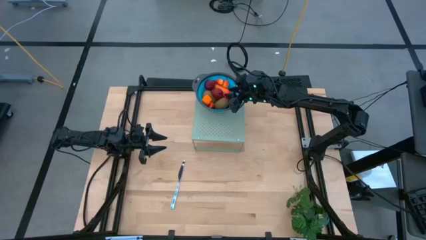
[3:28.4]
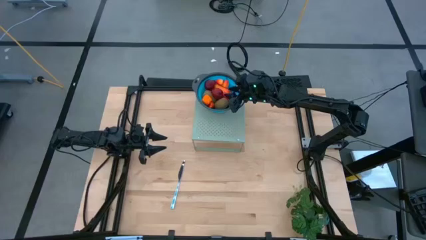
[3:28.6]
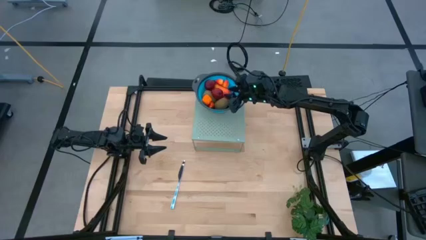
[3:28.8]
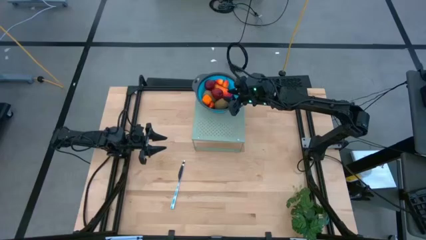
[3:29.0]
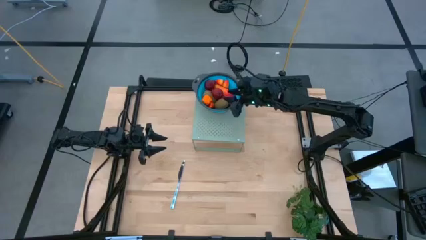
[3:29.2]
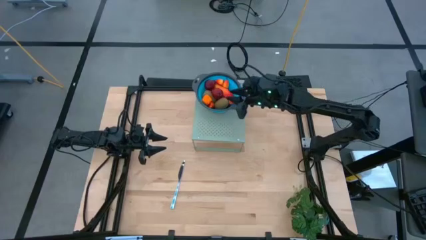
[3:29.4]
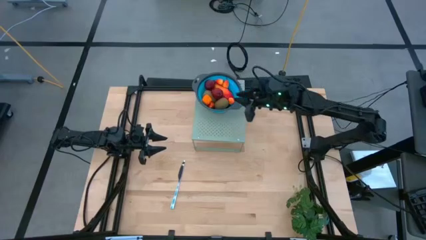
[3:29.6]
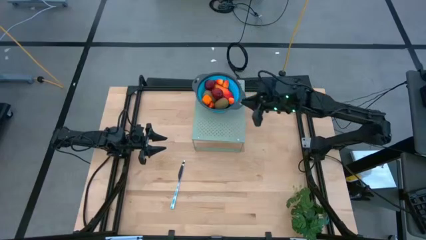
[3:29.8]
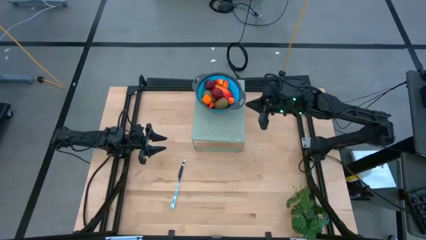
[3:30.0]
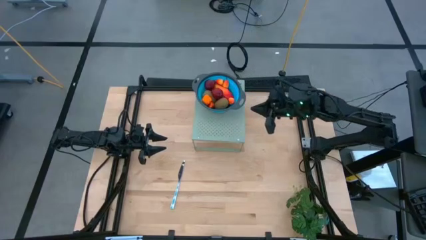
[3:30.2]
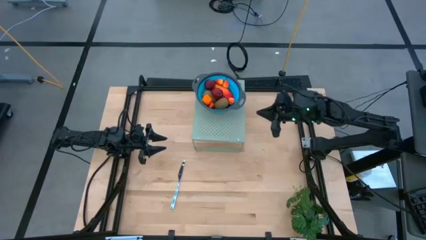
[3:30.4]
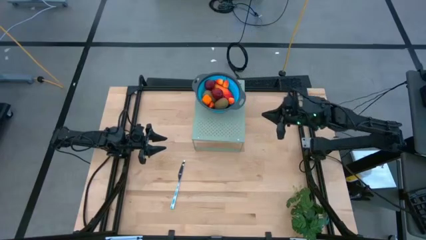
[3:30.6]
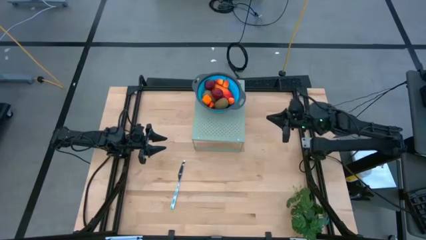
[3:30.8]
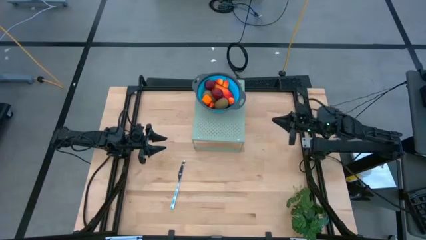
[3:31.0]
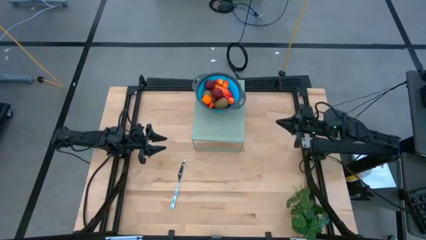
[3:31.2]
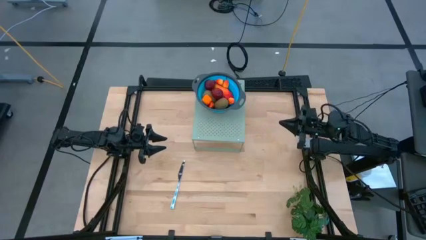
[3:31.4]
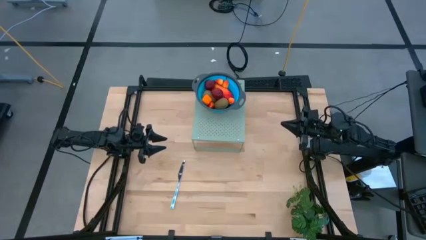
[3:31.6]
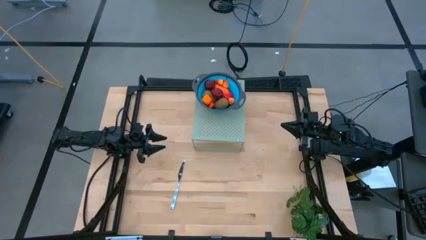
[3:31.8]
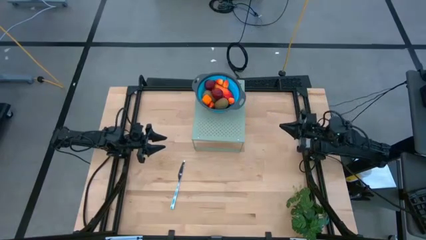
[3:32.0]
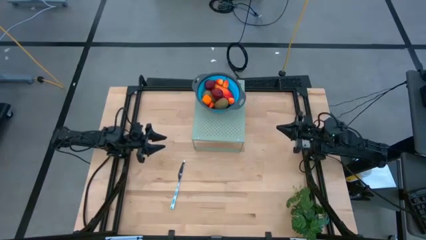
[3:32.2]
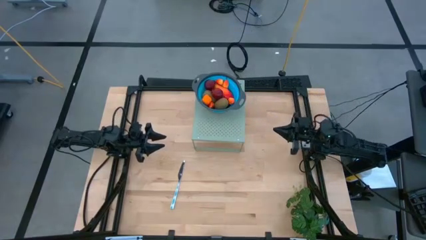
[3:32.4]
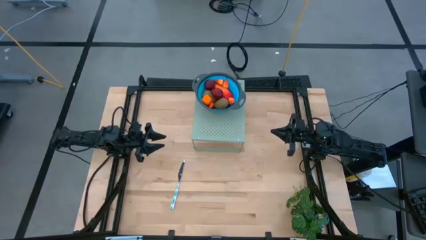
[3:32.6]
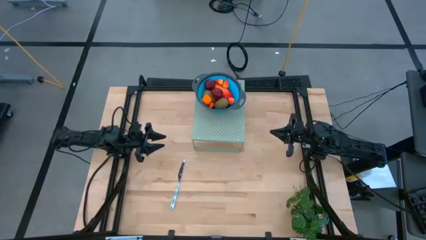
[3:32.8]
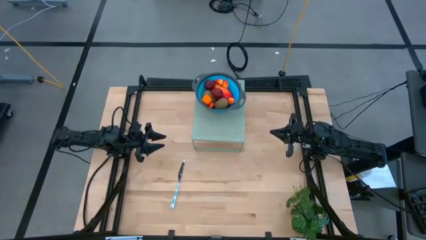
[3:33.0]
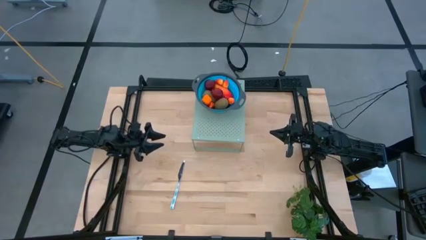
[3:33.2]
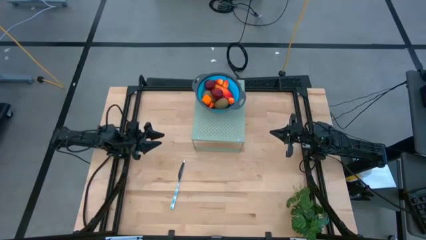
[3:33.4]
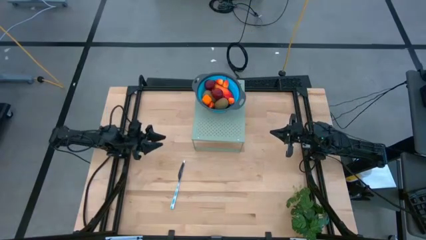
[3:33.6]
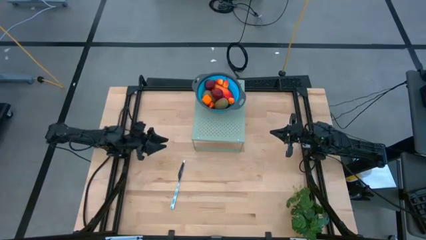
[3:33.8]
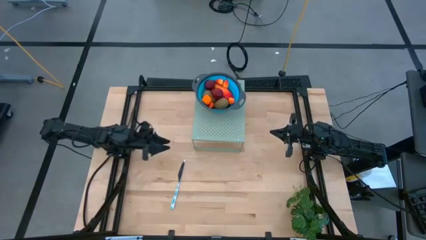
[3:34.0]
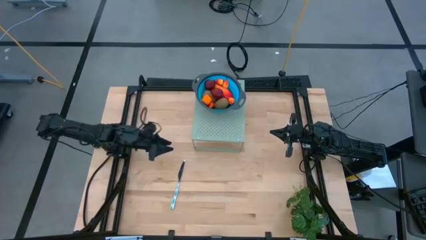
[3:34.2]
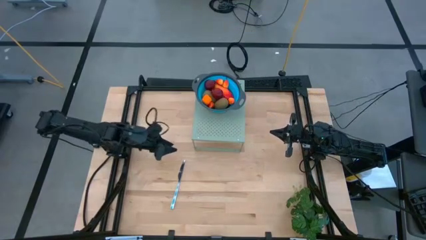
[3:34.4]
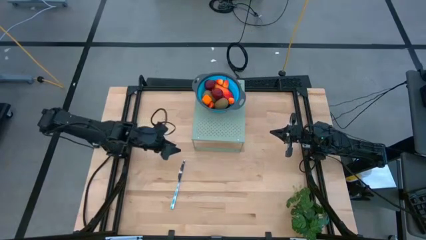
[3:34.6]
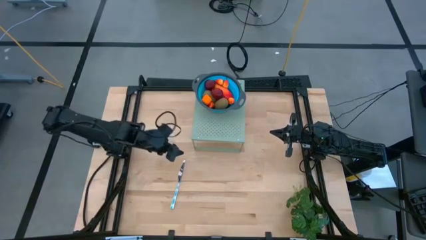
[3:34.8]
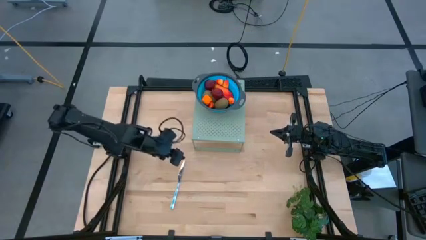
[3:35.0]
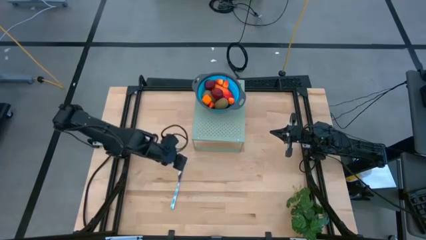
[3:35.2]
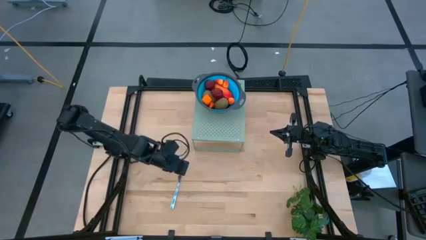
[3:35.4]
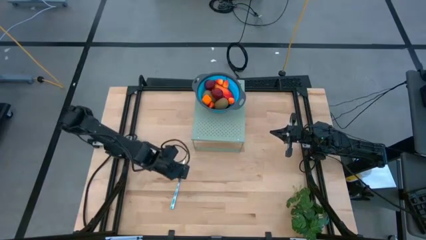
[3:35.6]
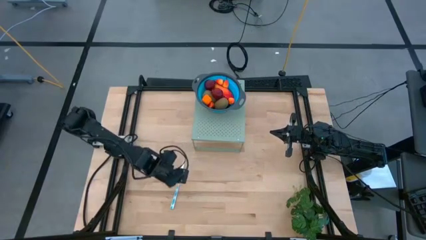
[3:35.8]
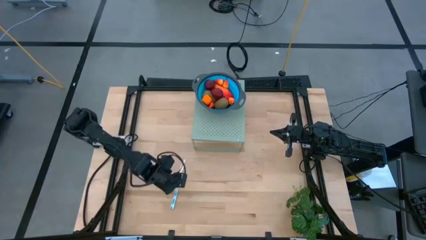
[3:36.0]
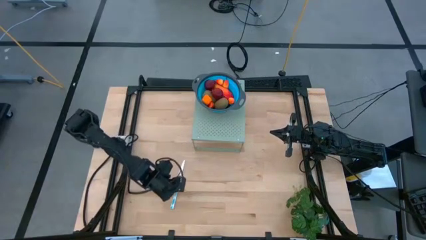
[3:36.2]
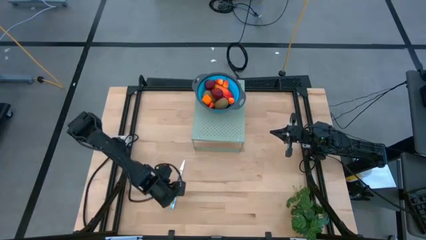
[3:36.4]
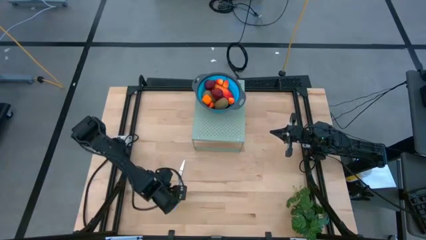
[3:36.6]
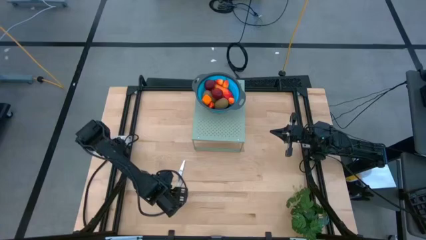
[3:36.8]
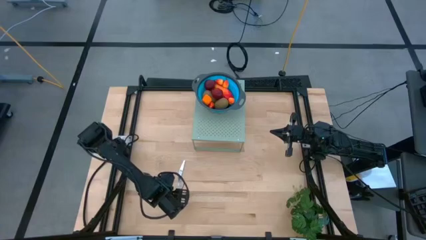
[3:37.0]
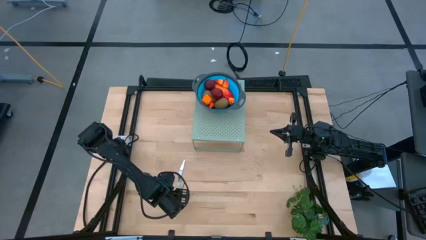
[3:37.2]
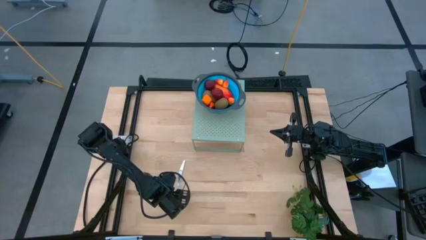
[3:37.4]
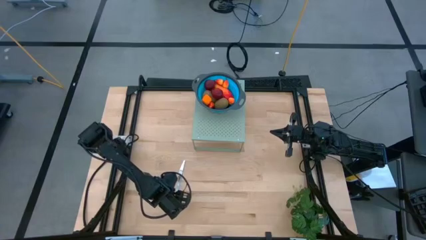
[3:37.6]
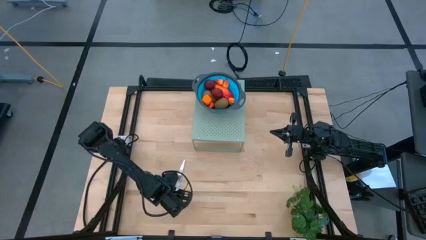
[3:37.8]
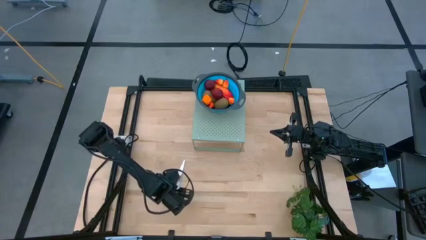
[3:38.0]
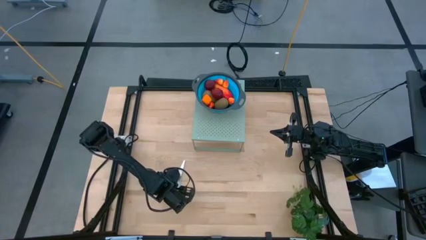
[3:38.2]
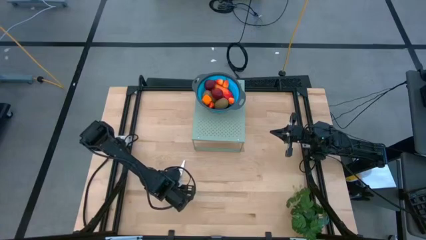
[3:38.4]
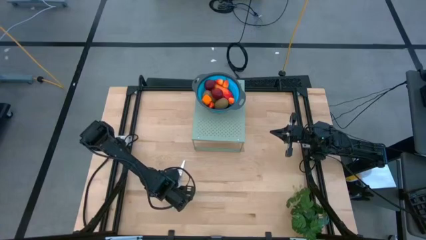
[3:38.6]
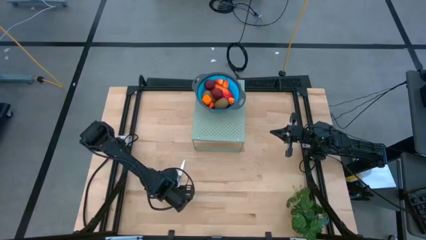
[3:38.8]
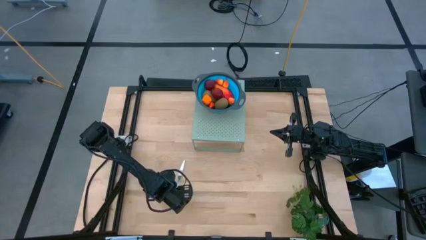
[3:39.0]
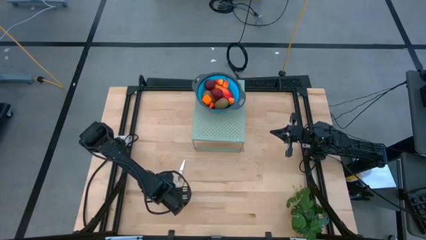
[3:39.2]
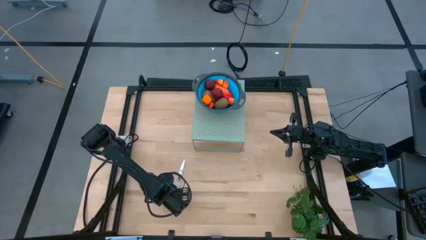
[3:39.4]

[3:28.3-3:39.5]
Task: Pick & Place Fruit
Put the table knife on the shelf

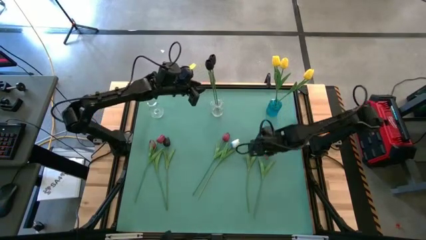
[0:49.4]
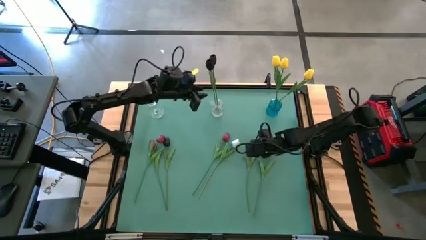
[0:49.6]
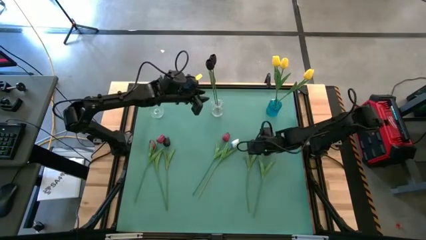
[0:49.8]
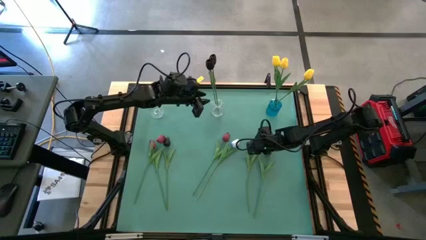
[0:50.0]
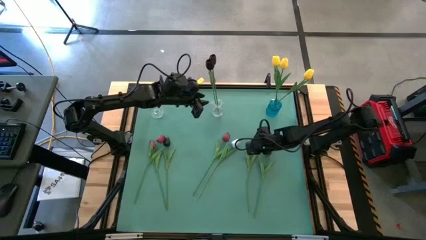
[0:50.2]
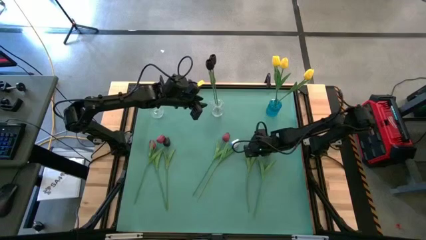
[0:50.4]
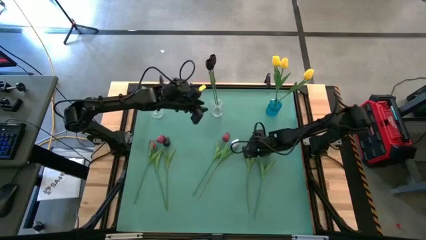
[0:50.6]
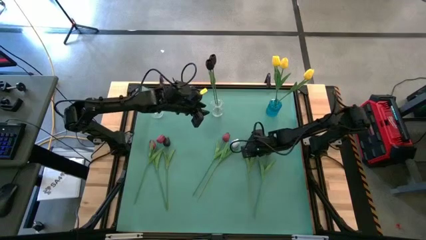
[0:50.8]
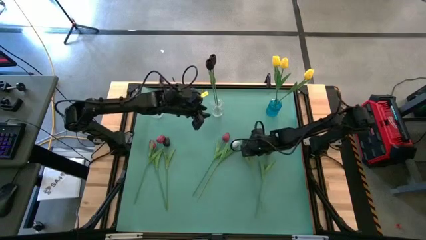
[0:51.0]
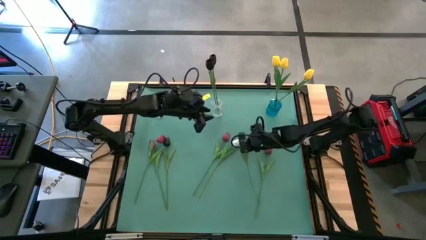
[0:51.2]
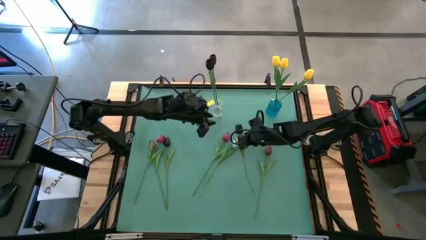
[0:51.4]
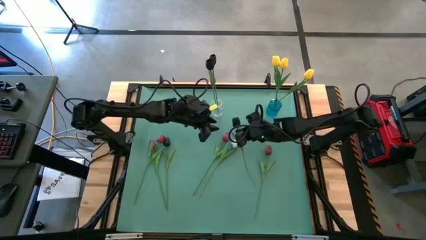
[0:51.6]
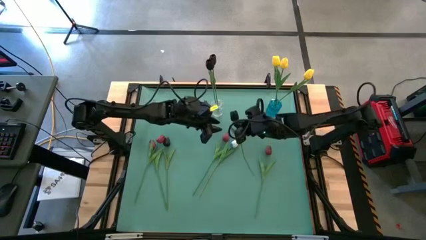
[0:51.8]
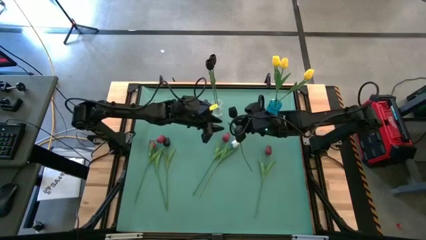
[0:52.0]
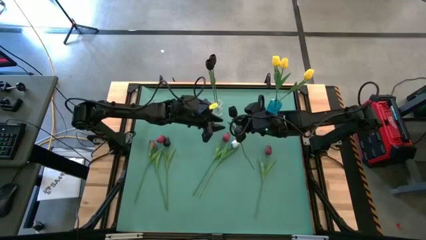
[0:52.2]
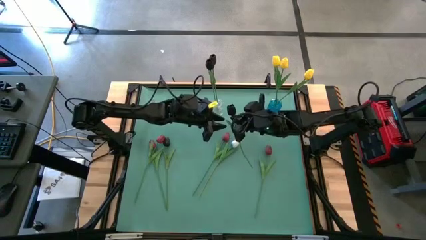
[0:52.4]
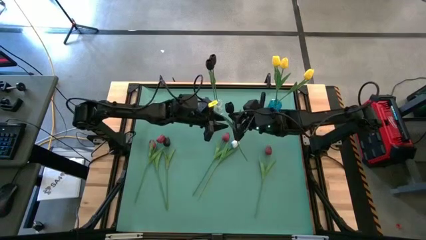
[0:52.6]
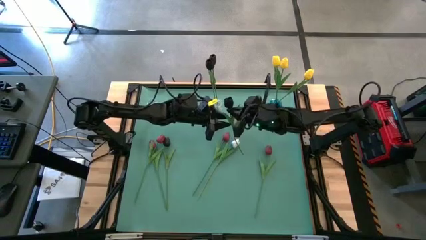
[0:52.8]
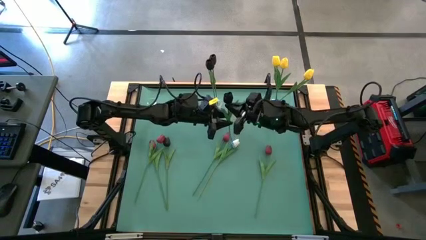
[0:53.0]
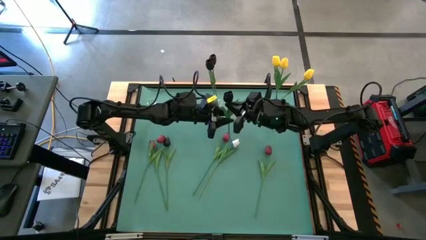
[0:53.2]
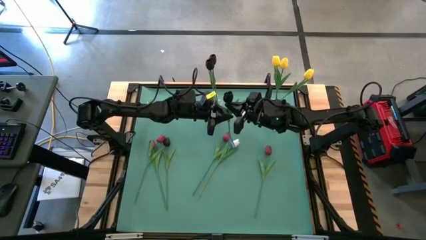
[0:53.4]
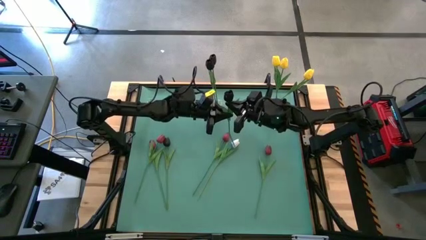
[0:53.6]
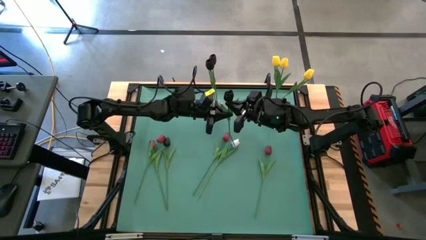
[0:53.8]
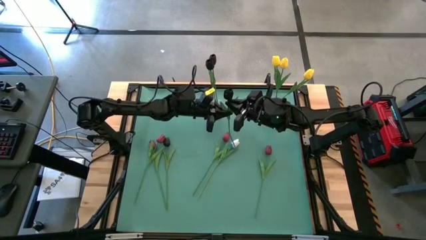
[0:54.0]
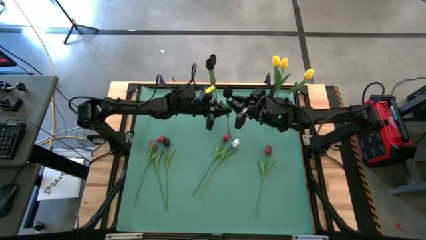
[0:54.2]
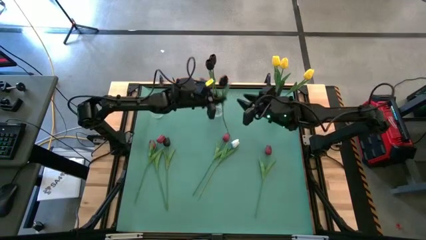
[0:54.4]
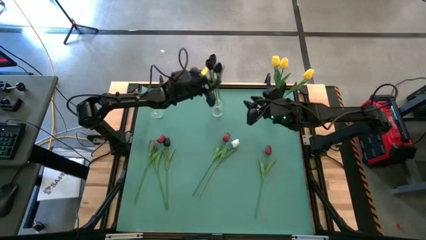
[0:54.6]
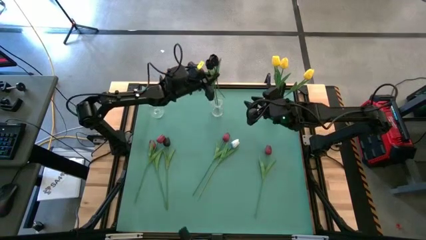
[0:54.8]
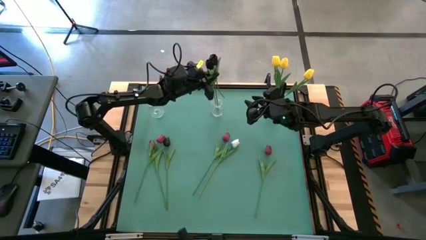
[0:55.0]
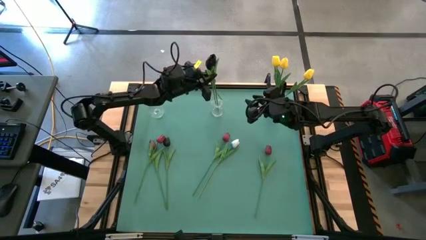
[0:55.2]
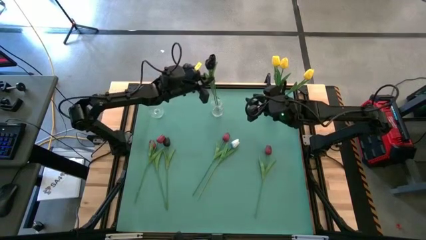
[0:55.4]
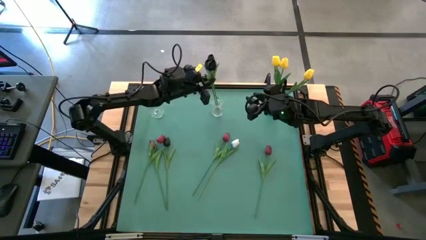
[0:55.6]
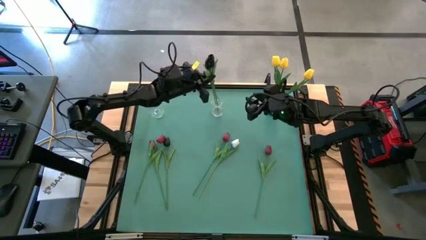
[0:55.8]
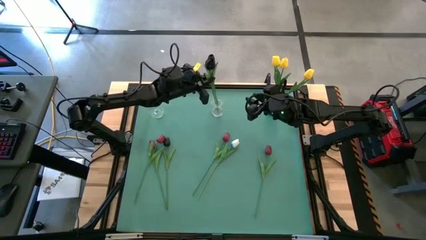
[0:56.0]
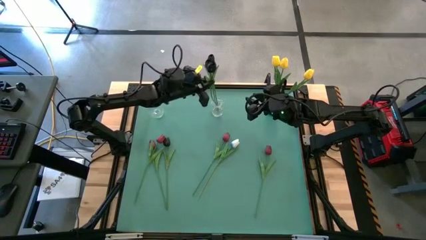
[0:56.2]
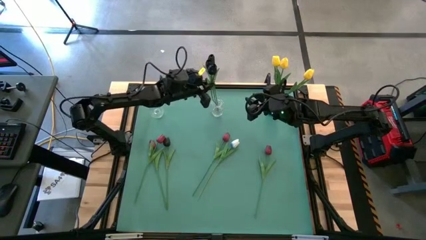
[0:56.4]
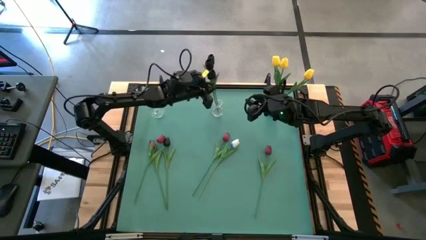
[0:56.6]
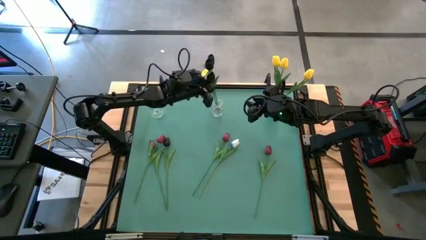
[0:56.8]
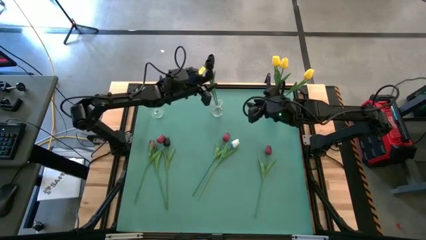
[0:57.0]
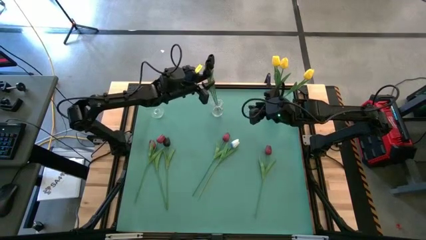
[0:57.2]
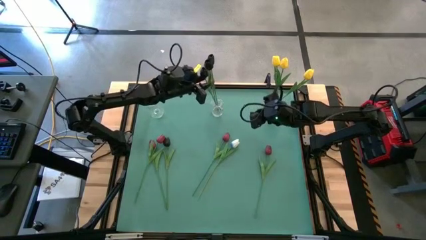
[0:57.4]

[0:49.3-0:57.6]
Task: Sort flowers into vase by color
Put the black tulip into the right transparent vase
